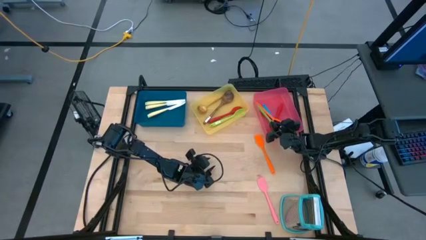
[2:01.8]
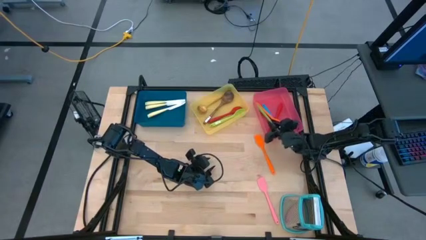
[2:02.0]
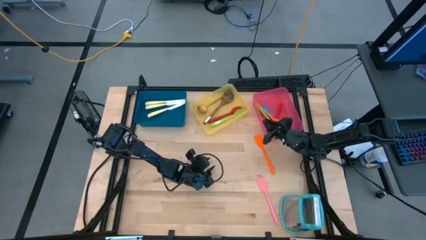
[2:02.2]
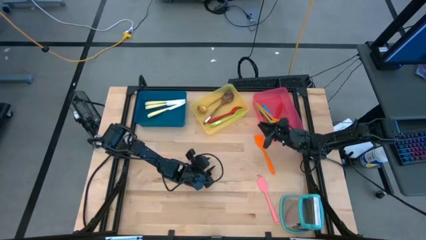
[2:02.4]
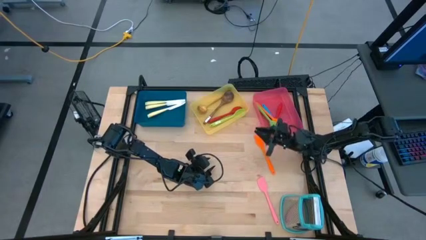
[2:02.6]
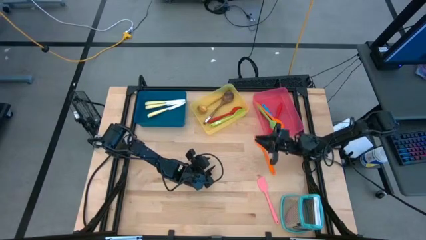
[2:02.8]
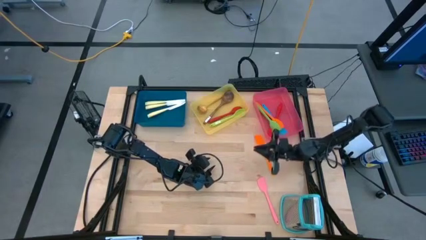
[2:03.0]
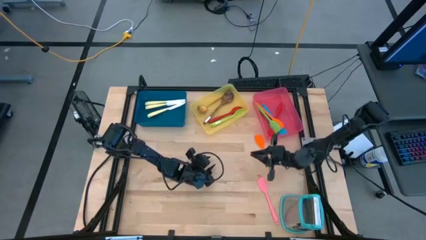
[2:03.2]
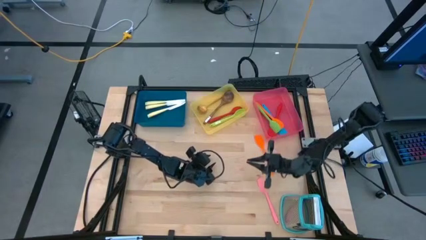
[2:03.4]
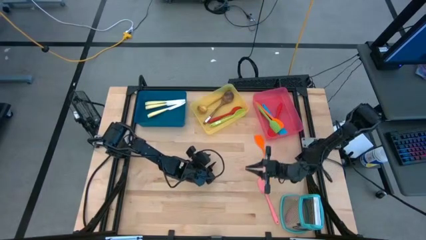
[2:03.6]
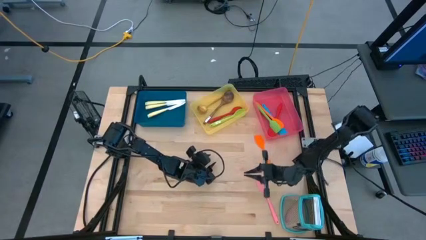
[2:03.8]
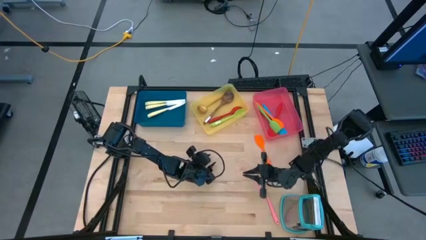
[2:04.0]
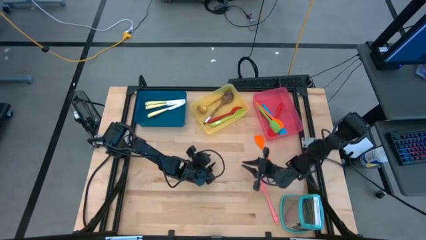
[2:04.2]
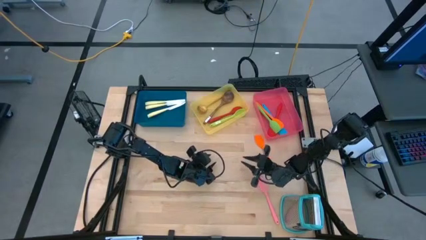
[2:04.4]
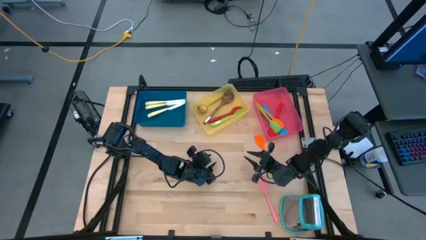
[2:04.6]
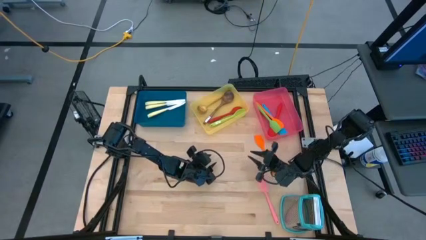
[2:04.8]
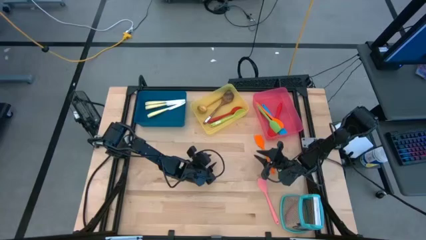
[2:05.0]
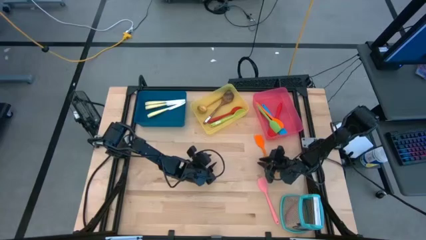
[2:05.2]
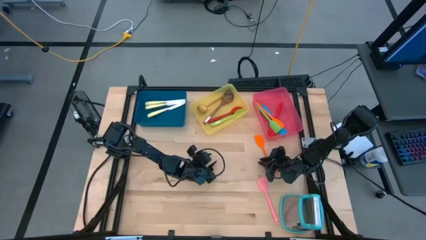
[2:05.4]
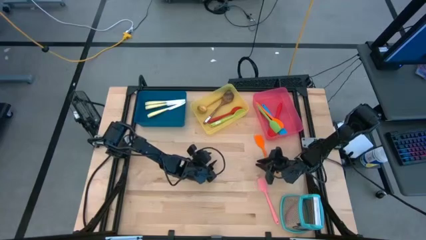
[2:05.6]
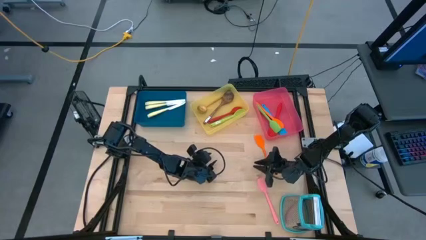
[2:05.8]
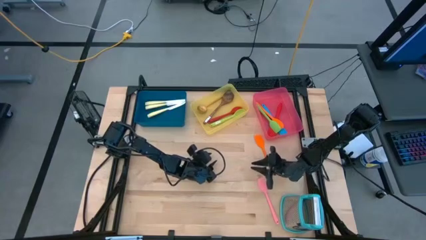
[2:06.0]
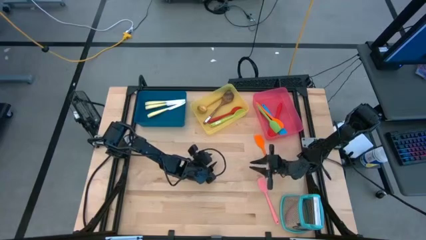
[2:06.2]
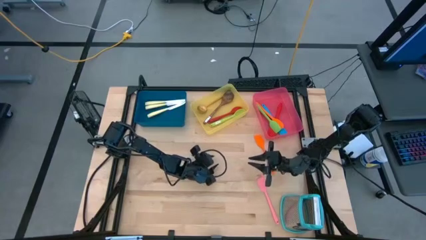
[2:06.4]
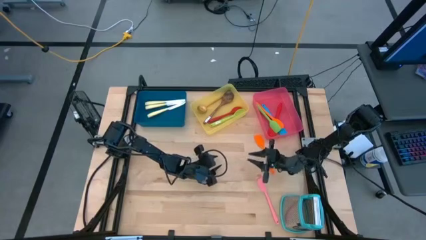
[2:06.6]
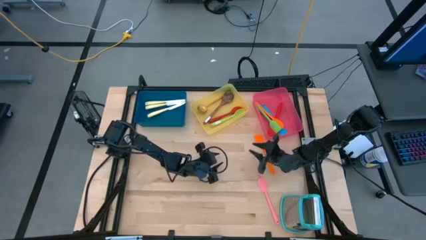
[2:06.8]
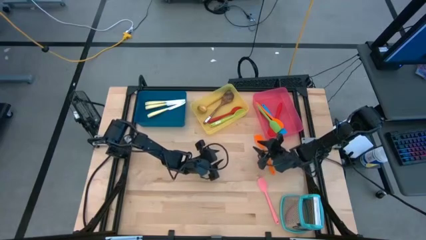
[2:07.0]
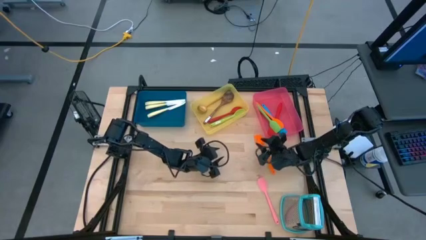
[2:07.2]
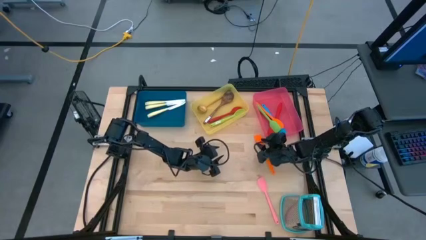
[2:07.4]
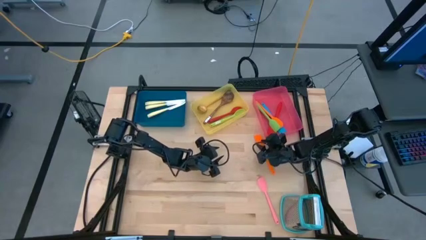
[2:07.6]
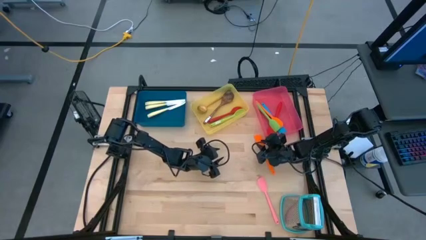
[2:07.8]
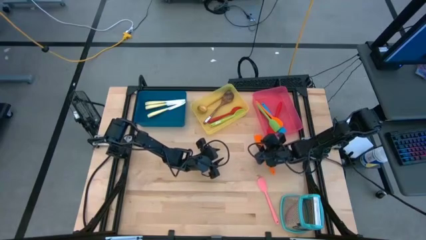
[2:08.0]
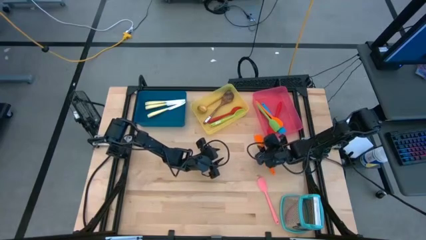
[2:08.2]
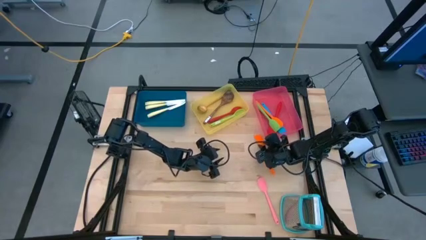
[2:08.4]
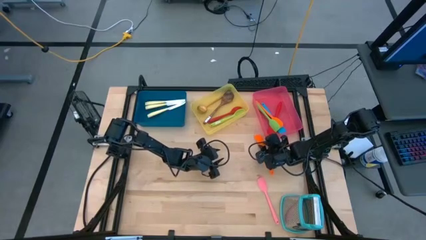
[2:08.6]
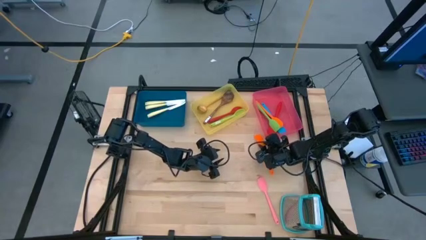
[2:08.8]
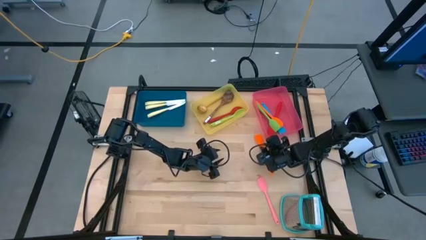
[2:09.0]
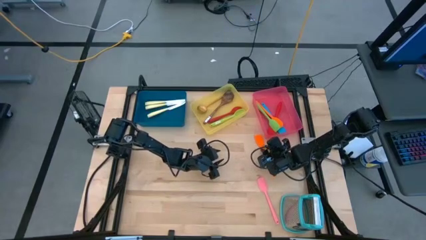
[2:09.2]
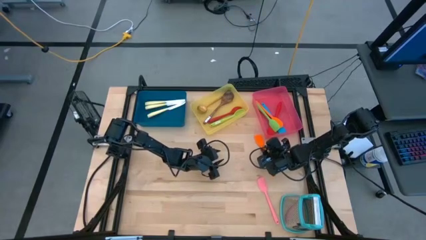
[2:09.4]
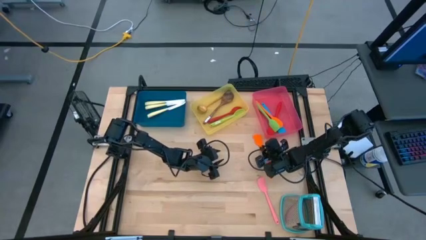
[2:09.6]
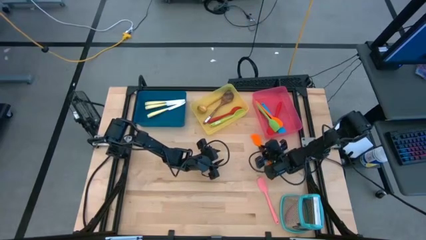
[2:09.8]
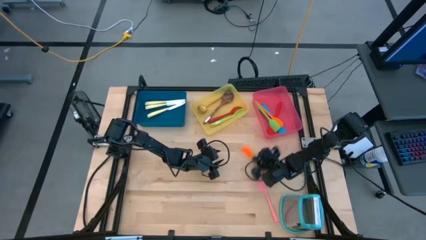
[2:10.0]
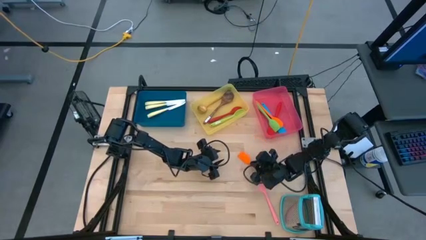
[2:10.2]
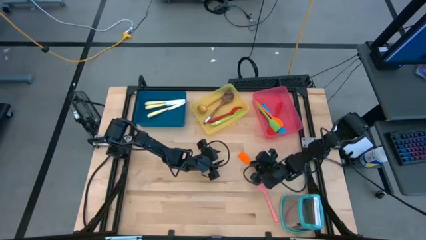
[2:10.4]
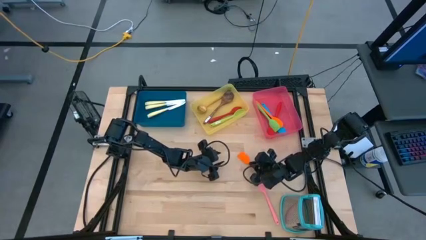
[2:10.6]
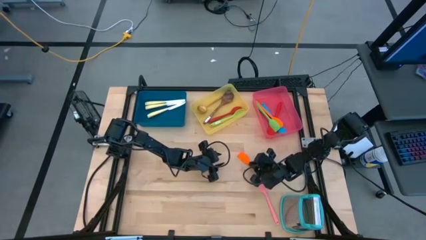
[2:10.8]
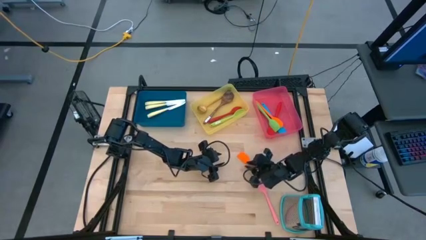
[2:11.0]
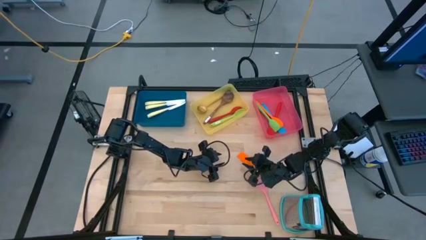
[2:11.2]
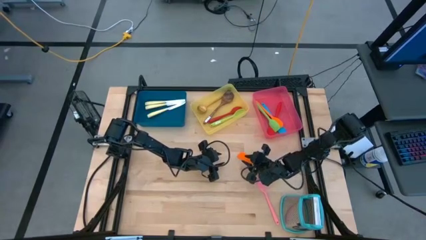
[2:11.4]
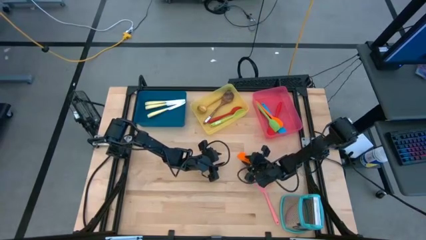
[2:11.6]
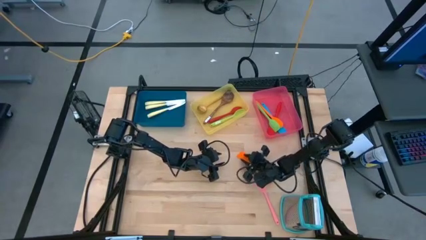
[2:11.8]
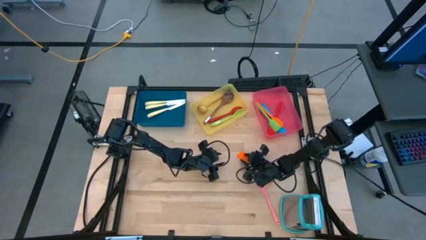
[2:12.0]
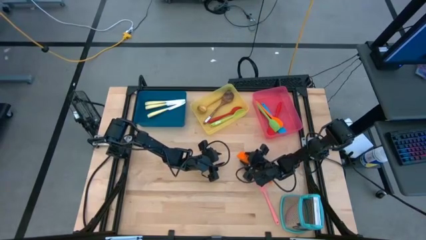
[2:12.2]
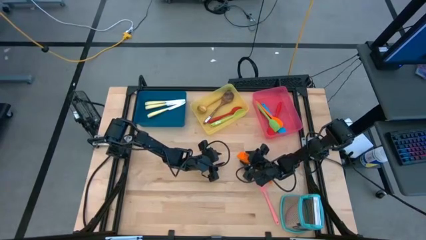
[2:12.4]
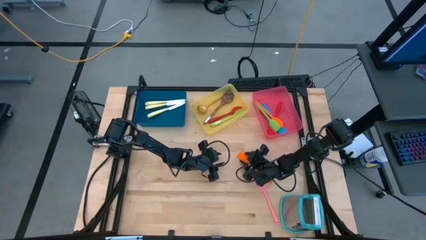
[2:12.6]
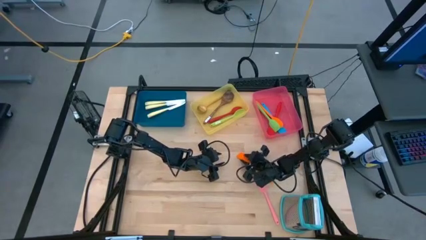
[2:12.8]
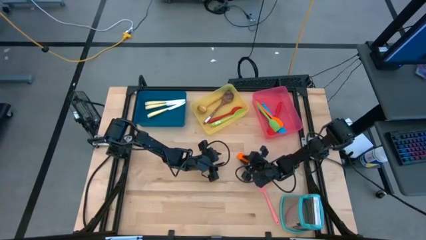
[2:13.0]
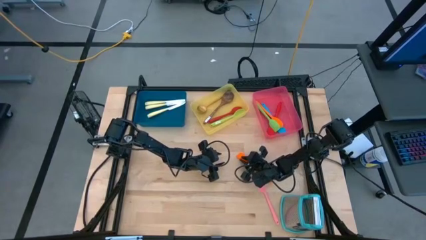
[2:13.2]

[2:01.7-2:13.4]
Task: Pick & Place Kitchen Items
Put the orange spatula into the red bin

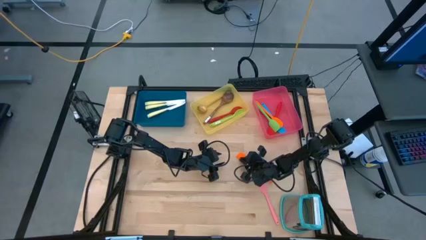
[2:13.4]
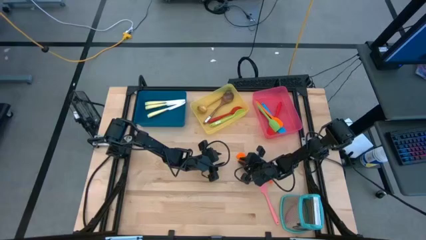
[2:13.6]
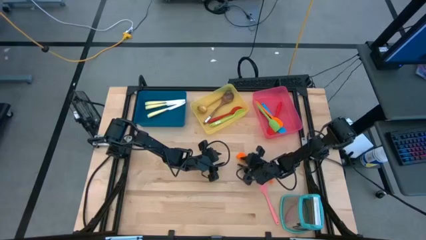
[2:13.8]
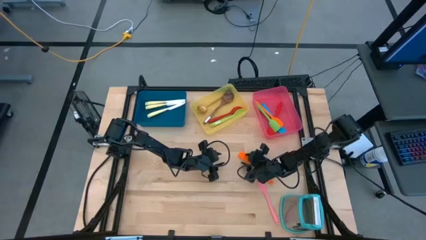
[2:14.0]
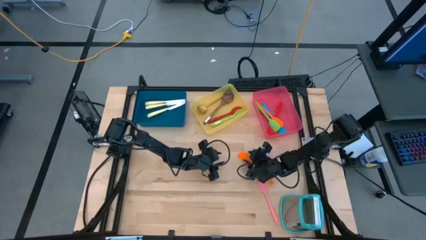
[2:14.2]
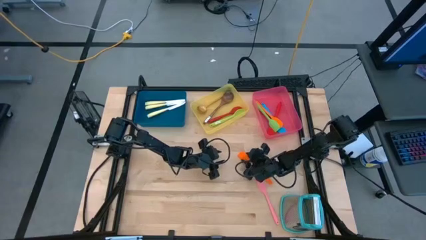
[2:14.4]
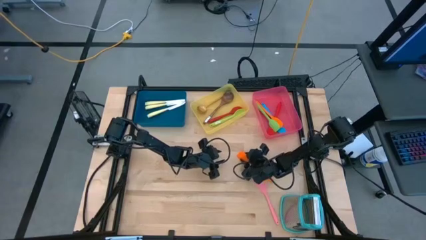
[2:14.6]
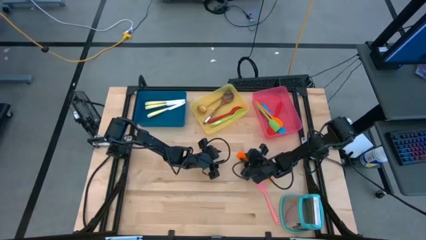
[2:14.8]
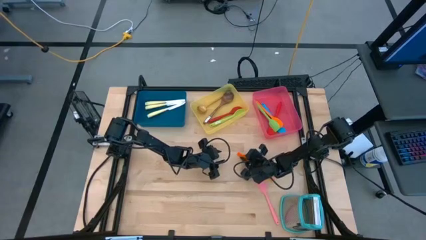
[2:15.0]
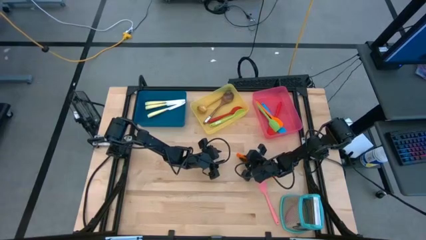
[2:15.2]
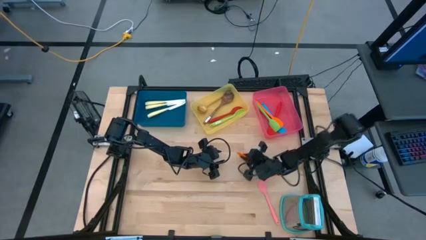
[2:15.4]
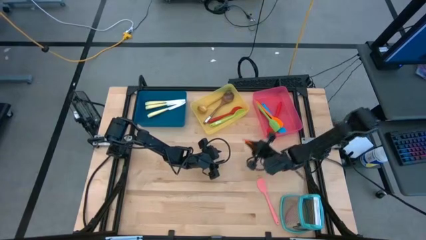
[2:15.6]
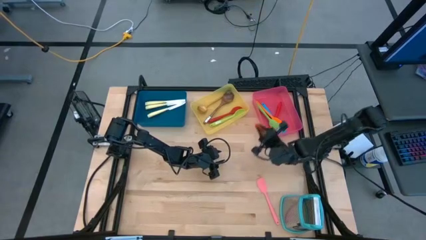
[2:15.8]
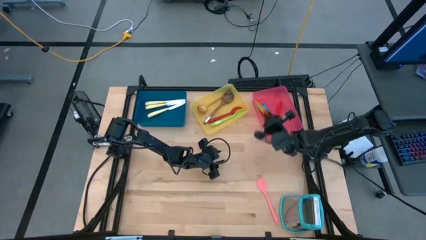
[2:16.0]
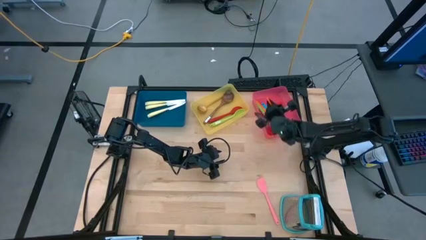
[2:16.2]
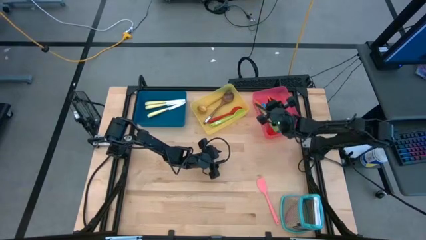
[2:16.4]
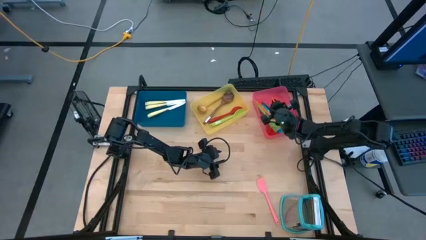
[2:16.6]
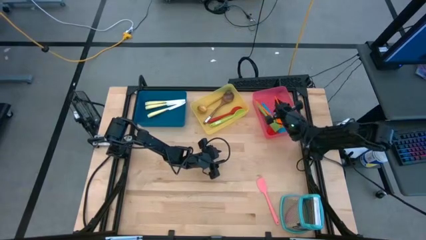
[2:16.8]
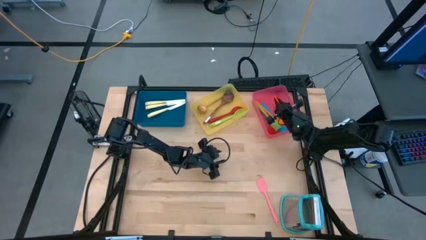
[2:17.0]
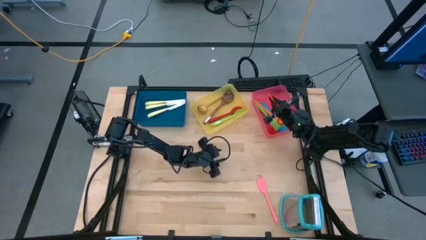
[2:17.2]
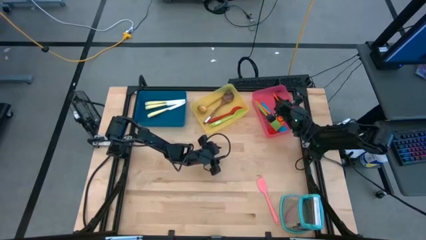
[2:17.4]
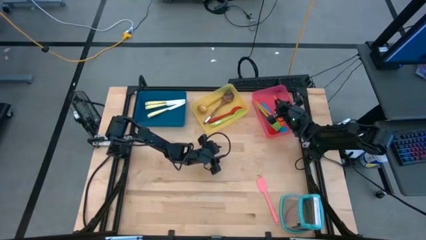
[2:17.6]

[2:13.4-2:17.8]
Put the orange spatula into the red bin
